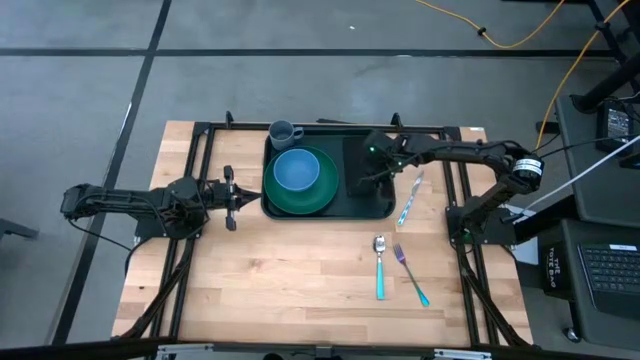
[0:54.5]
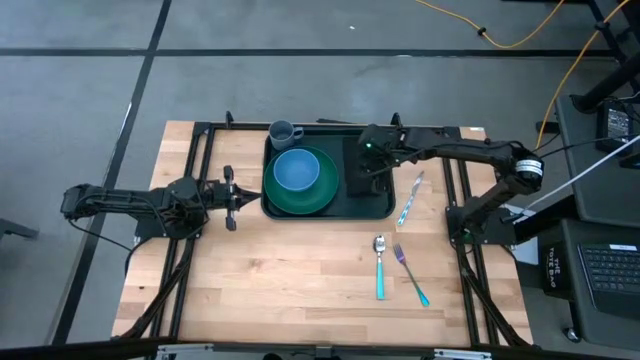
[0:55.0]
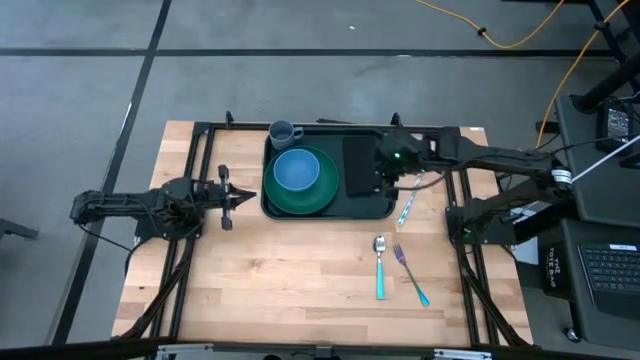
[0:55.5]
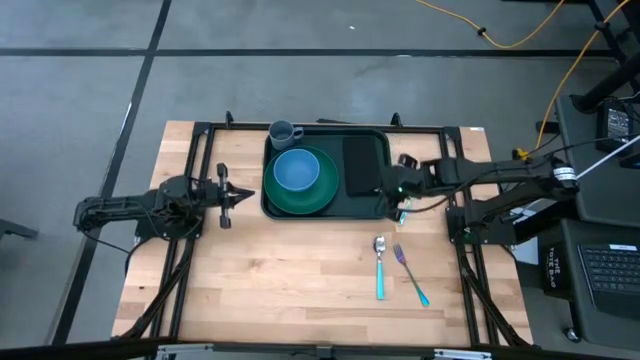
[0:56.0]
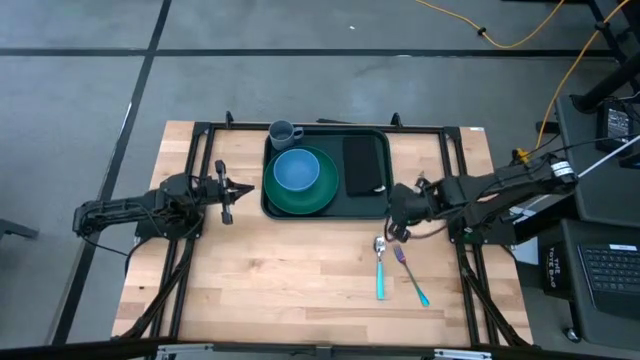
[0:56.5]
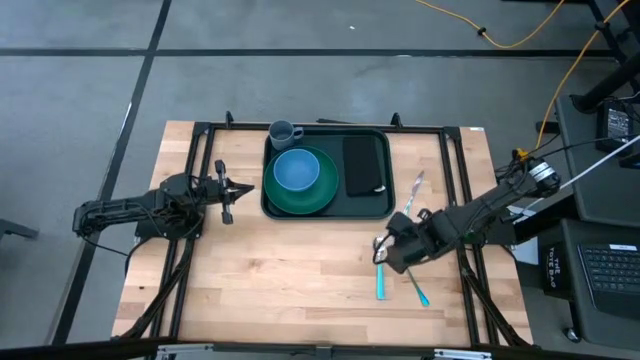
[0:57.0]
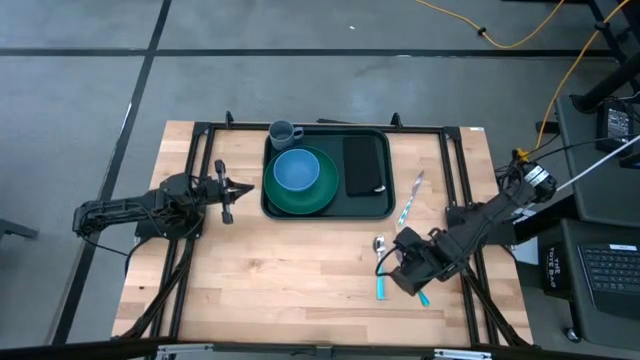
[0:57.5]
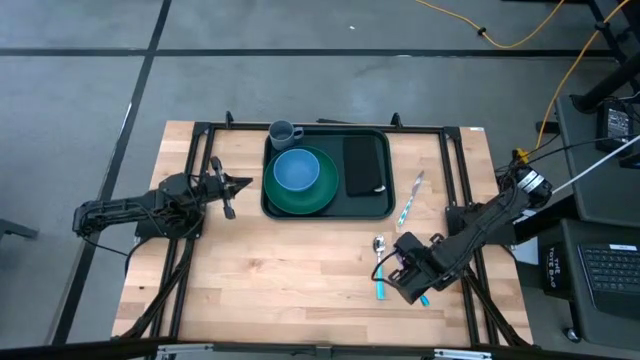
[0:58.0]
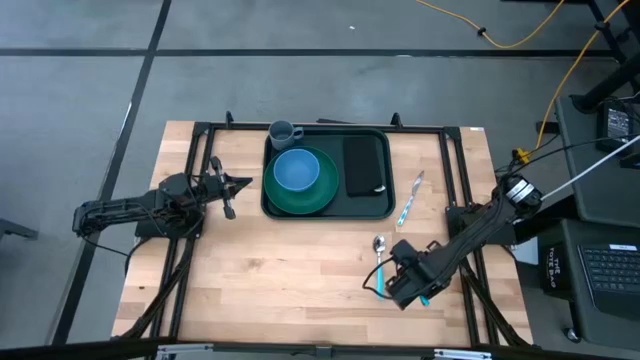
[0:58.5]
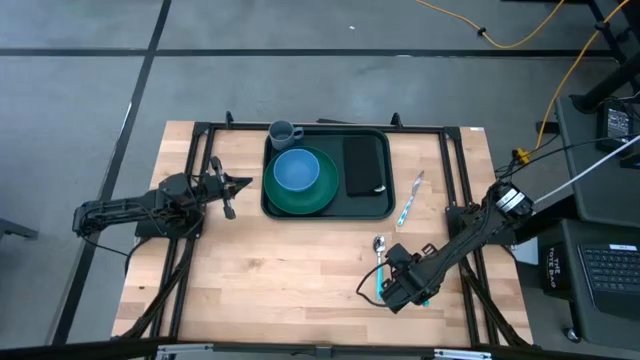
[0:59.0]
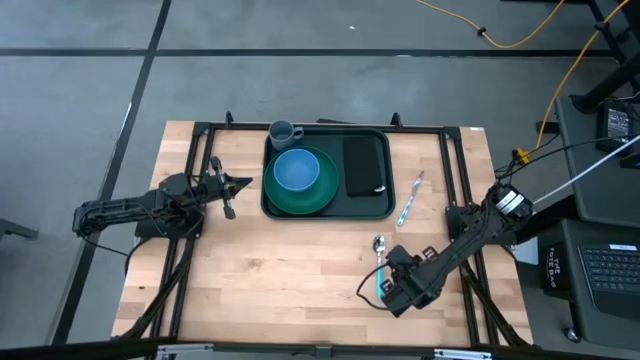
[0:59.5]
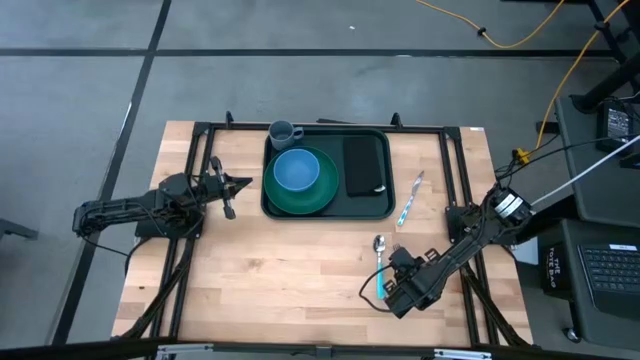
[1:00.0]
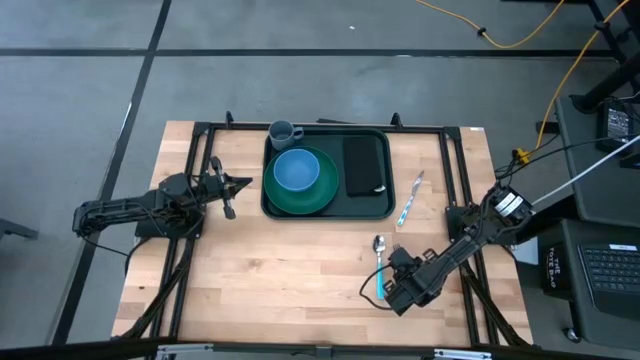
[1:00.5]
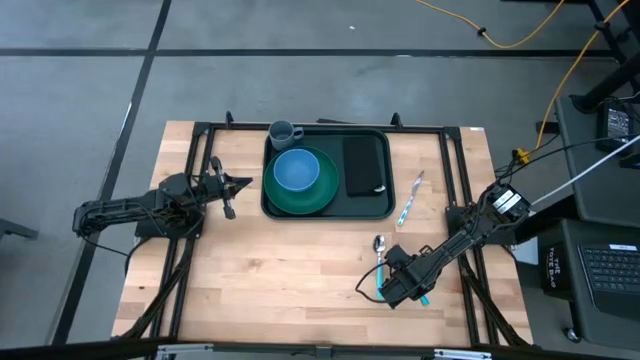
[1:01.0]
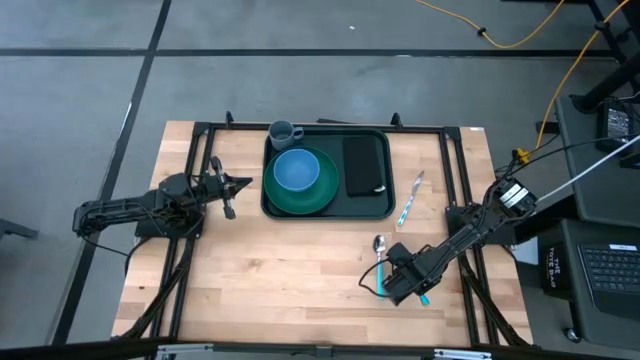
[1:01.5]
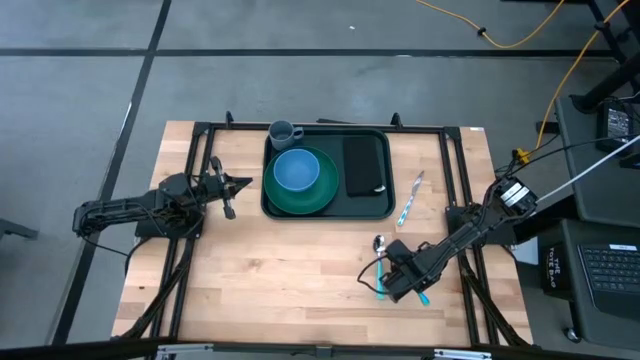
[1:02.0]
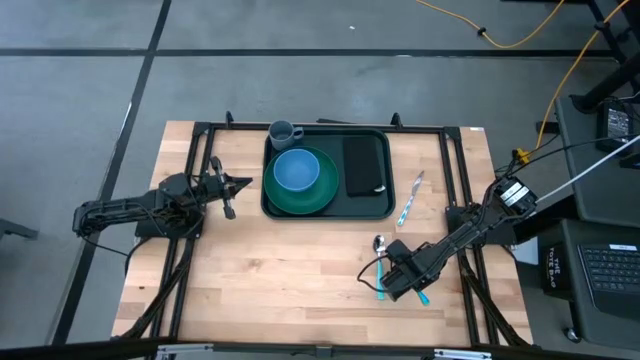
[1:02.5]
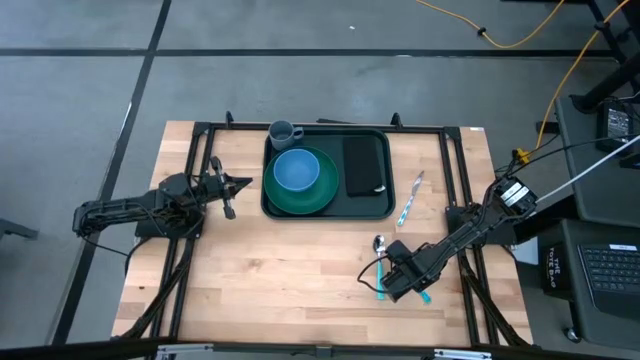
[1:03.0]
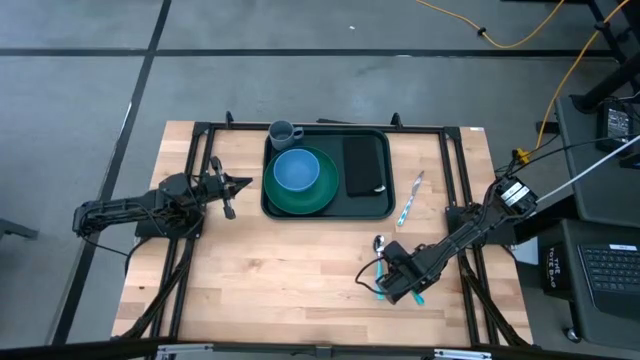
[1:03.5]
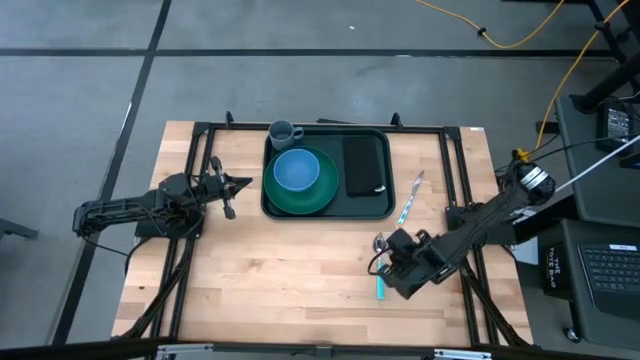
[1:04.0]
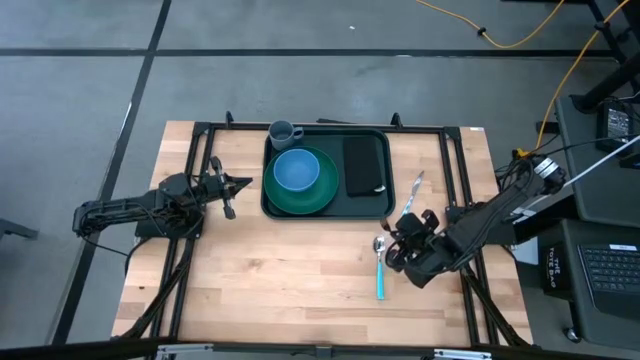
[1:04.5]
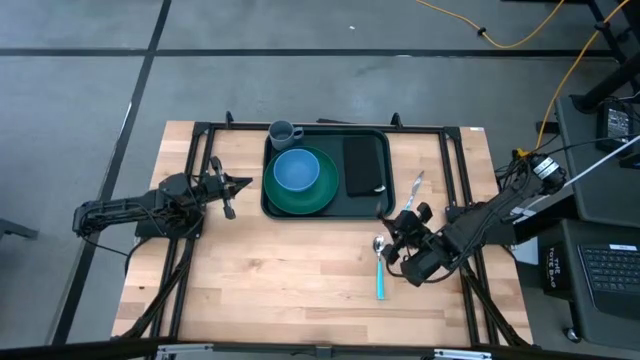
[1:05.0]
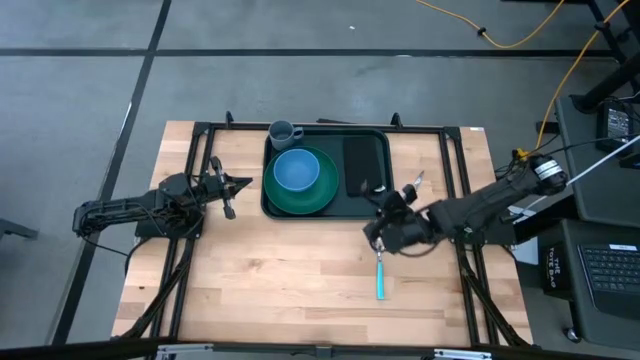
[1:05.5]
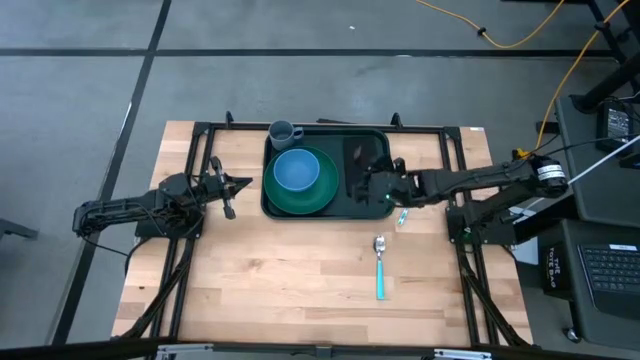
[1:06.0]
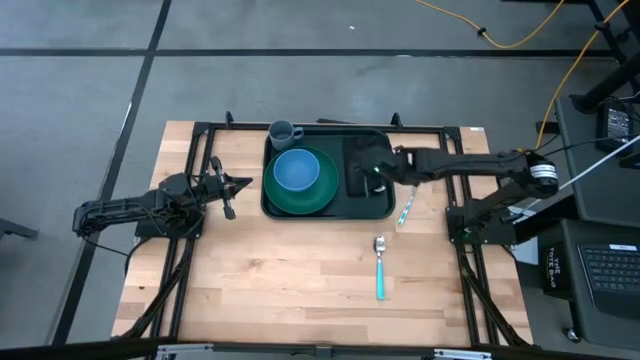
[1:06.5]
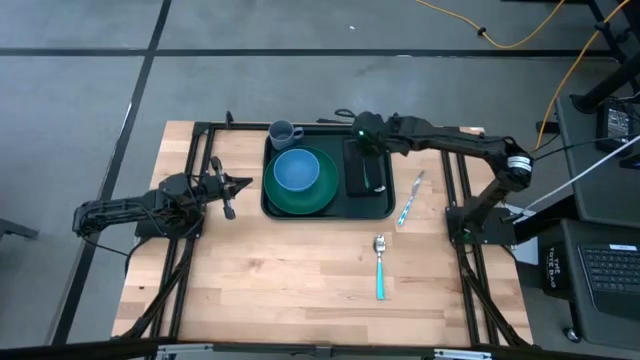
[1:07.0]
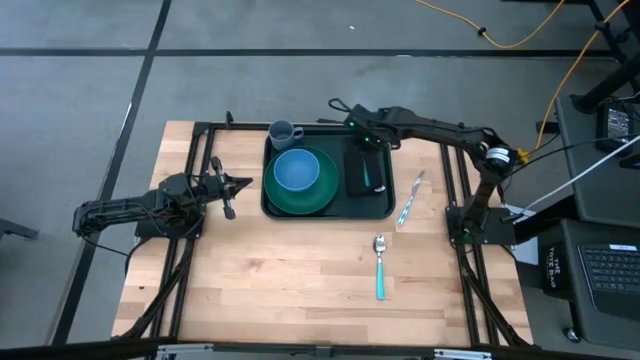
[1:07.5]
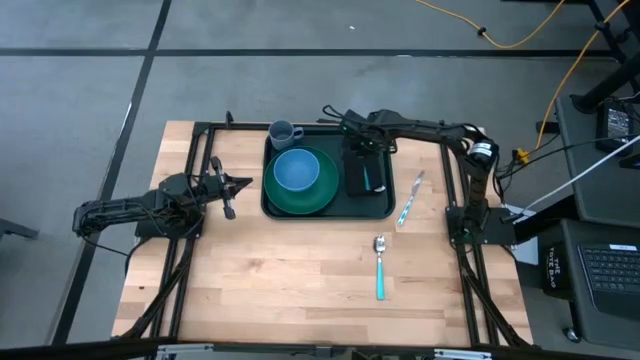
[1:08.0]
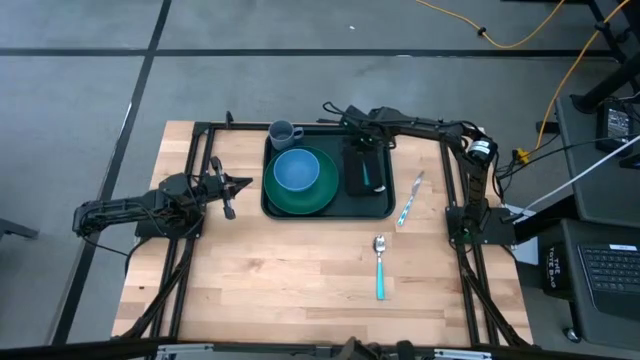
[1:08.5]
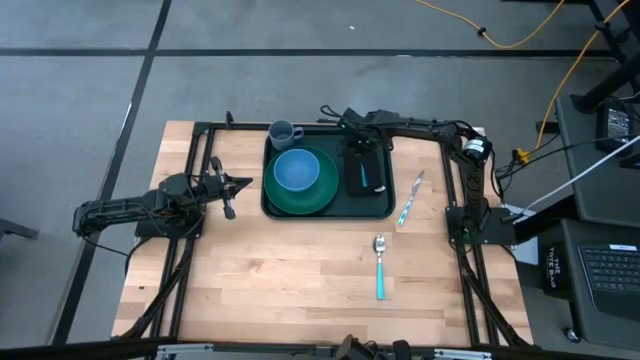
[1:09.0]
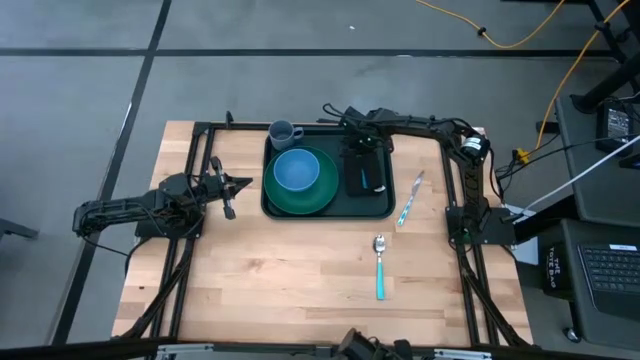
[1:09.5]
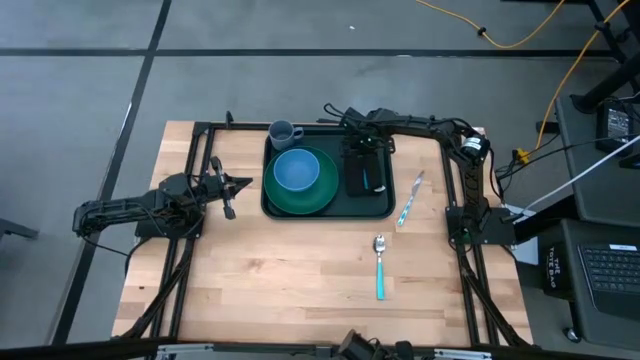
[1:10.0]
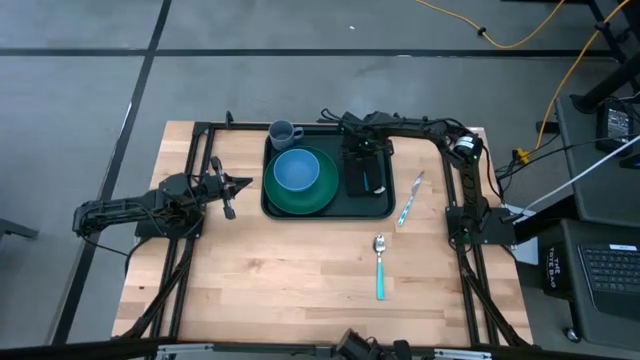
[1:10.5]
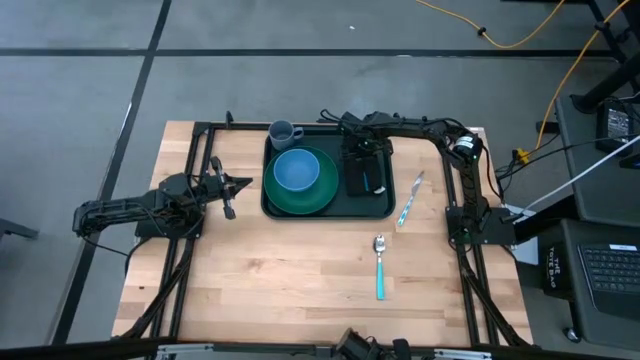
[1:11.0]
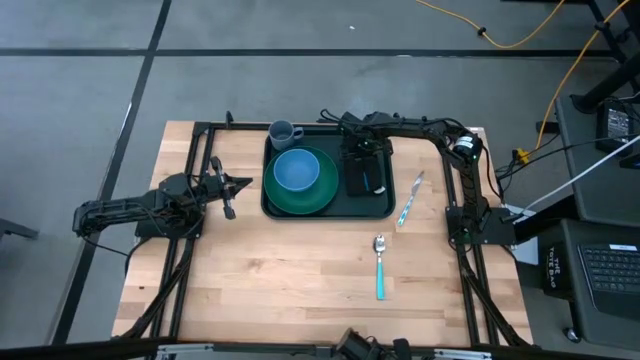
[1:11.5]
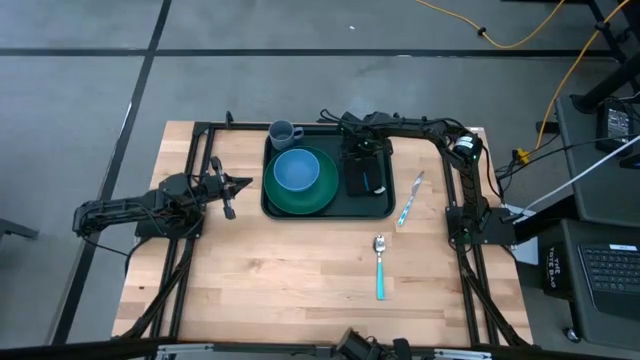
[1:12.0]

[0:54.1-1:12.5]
Task: Set up tray
Put the blue fork on the black napkin on the green serving tray

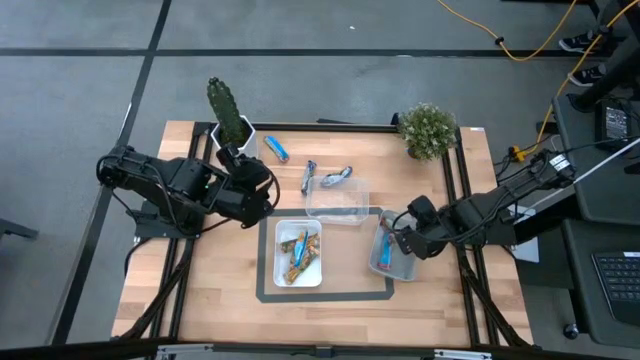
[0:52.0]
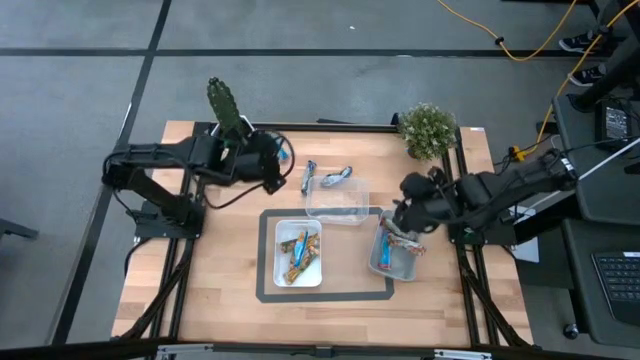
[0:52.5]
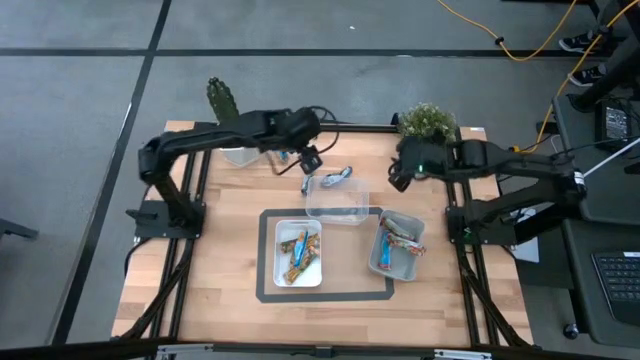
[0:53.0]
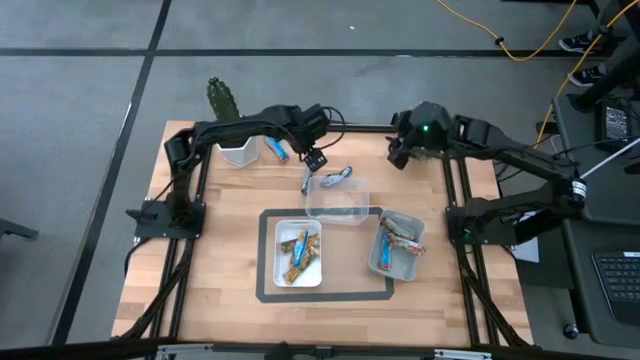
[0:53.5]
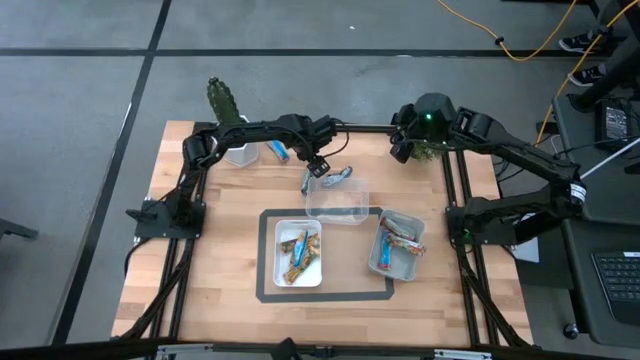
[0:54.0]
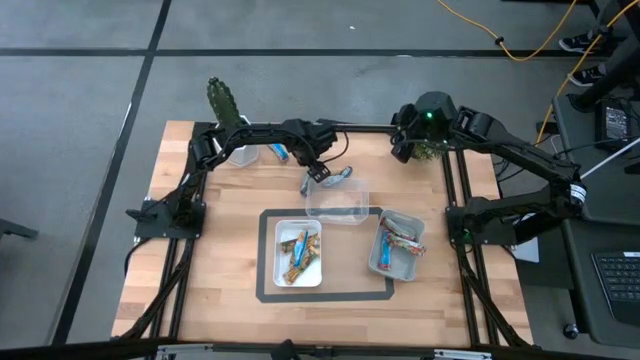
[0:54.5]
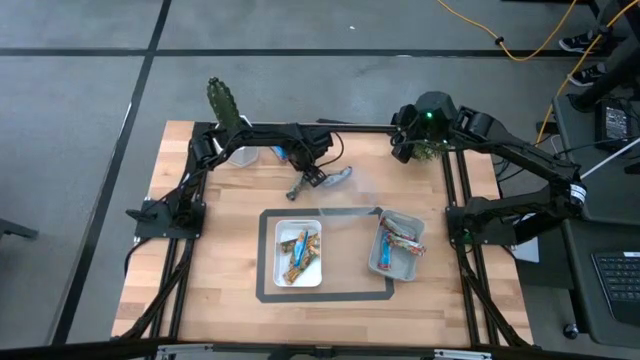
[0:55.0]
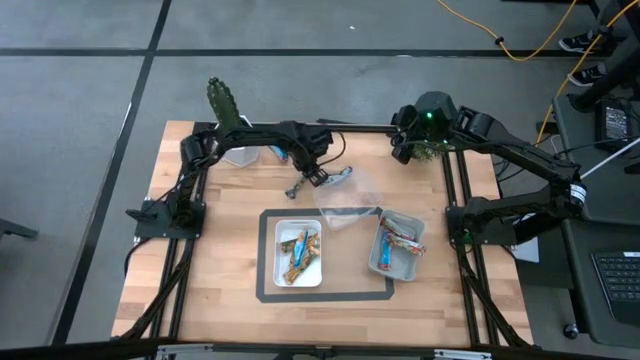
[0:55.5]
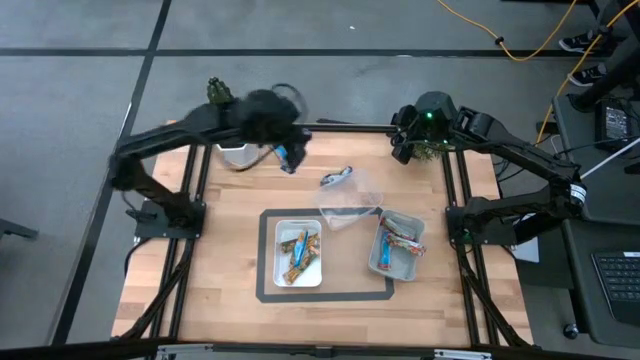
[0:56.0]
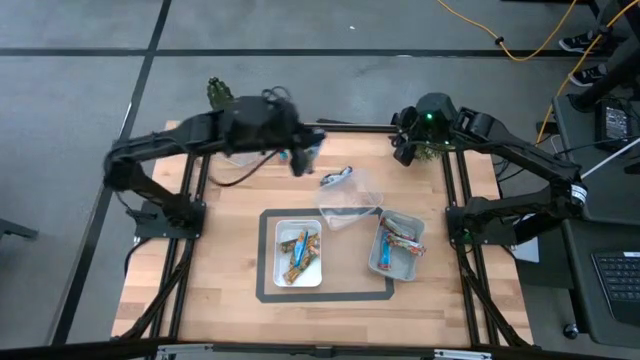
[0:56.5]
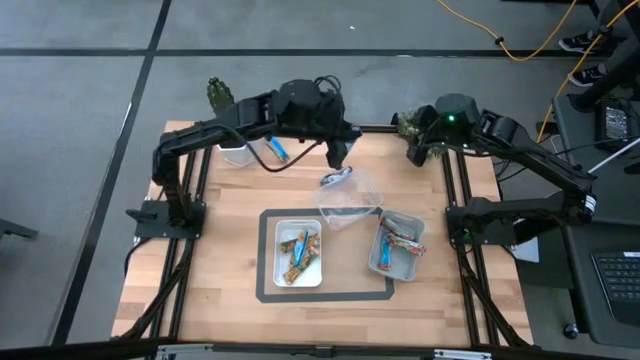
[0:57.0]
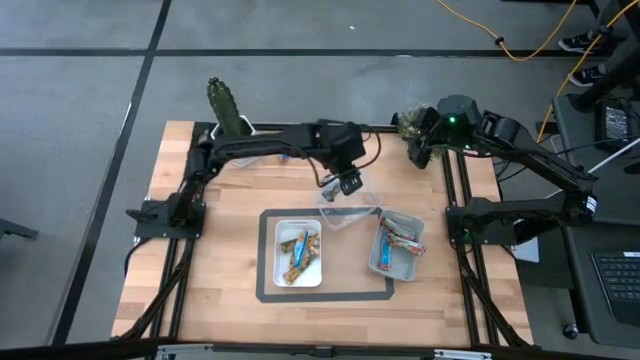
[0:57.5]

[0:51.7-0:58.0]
Task: Pick and place Granola Bars by type
Put the left blue granola bar into the transparent bin
